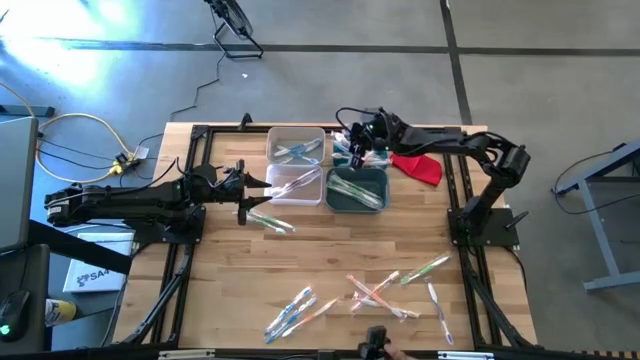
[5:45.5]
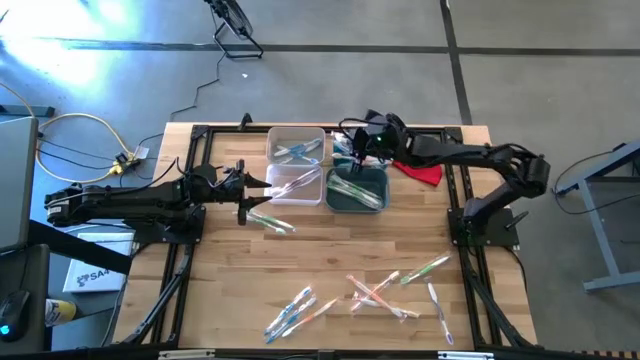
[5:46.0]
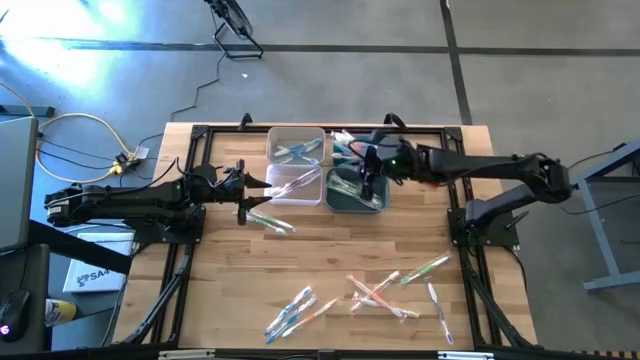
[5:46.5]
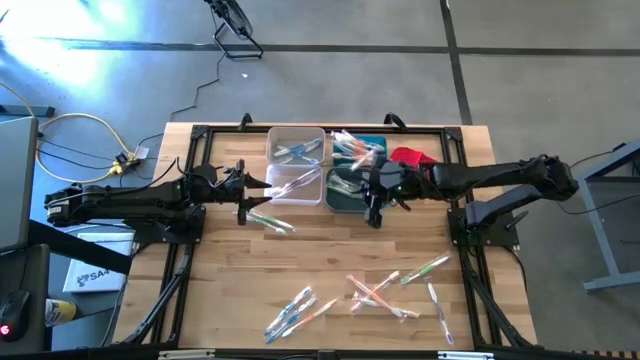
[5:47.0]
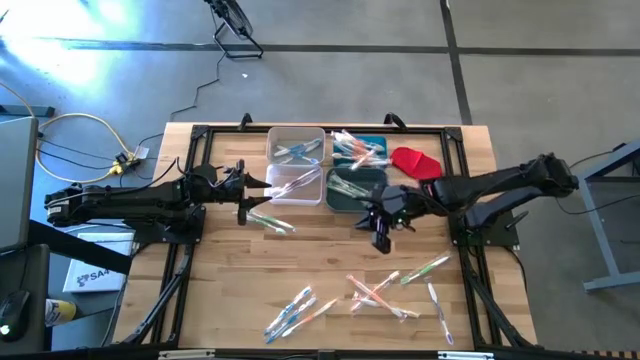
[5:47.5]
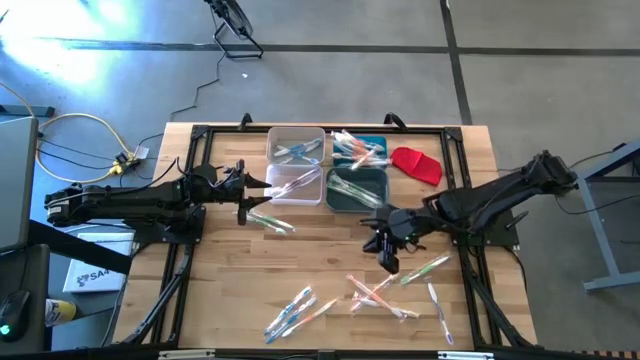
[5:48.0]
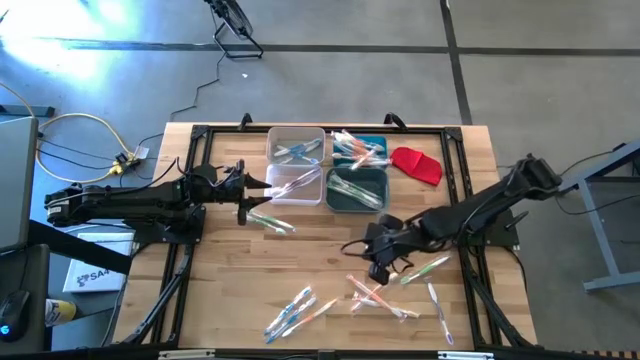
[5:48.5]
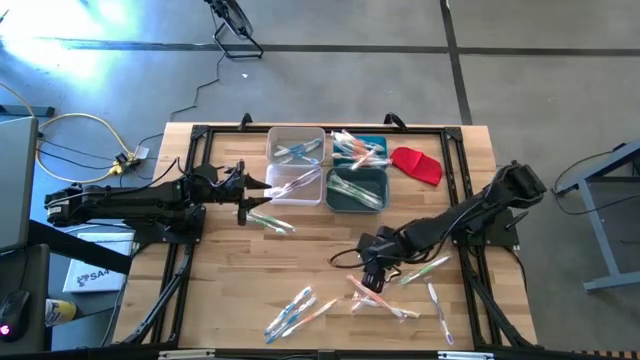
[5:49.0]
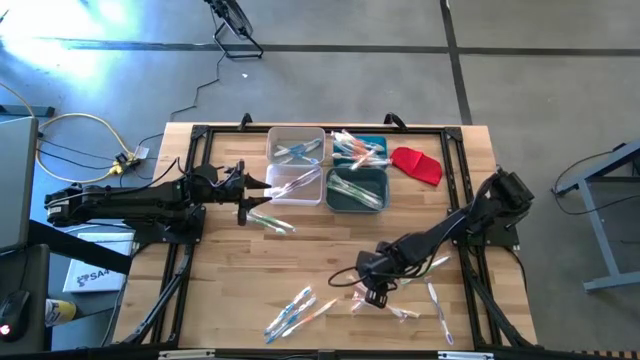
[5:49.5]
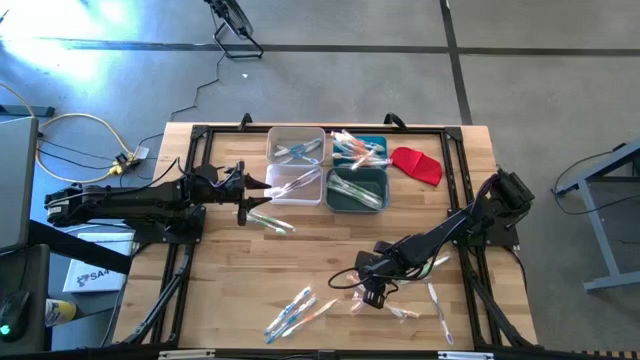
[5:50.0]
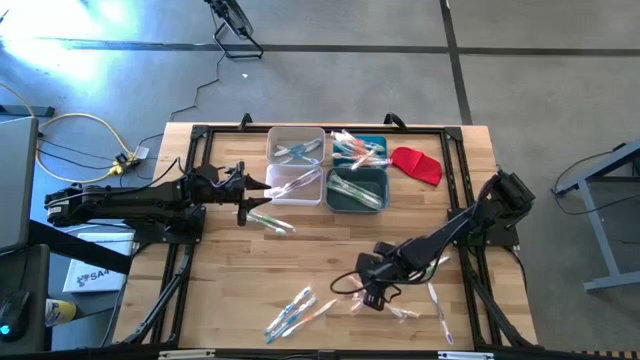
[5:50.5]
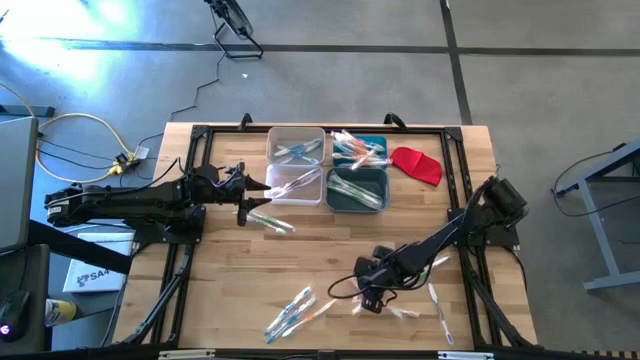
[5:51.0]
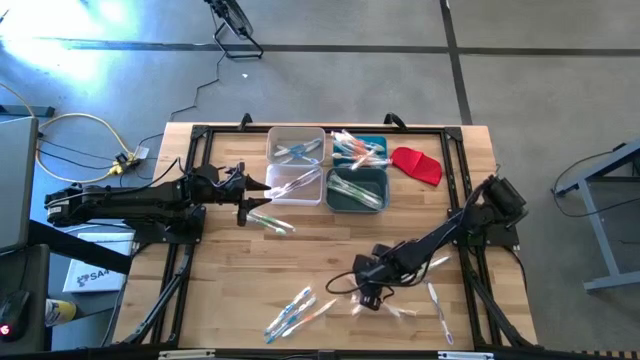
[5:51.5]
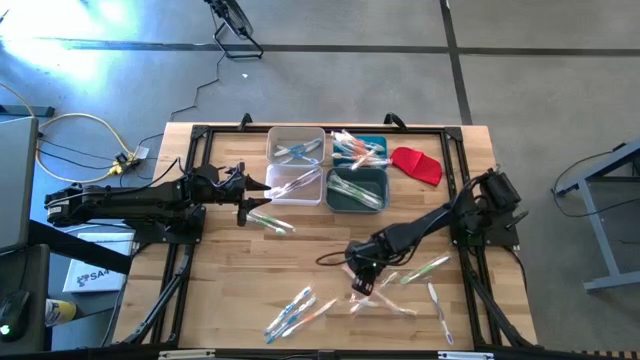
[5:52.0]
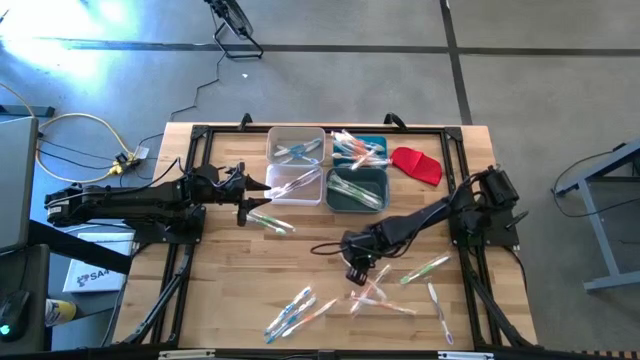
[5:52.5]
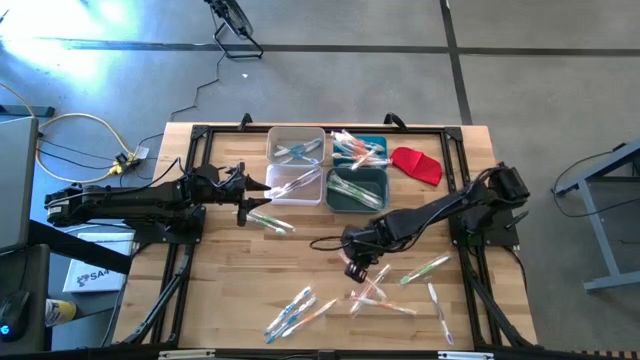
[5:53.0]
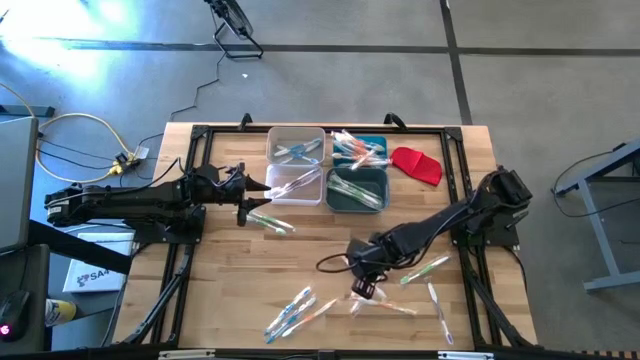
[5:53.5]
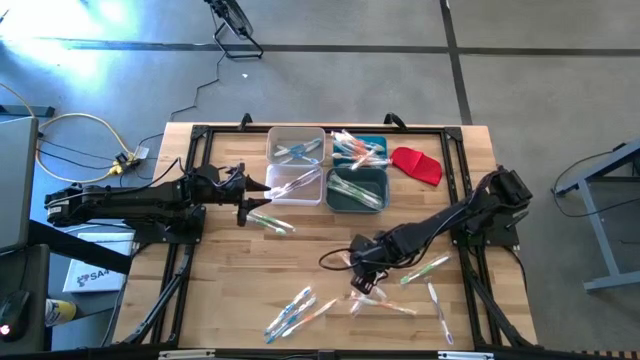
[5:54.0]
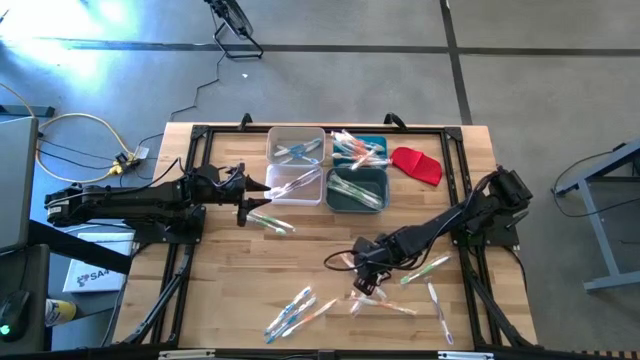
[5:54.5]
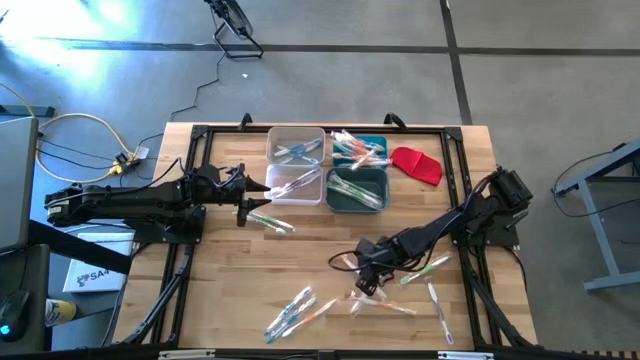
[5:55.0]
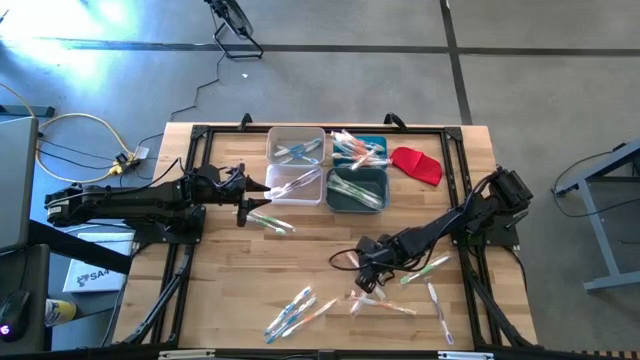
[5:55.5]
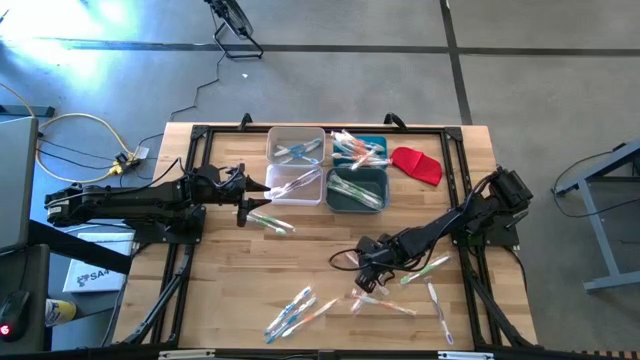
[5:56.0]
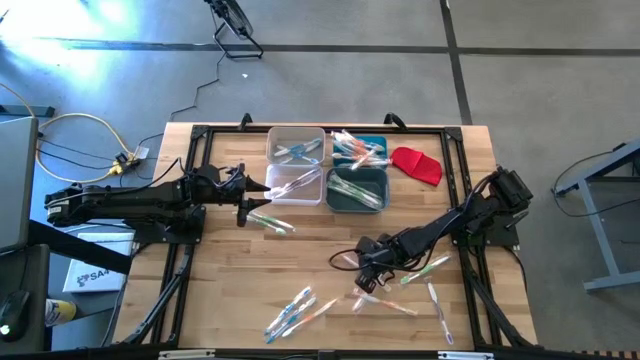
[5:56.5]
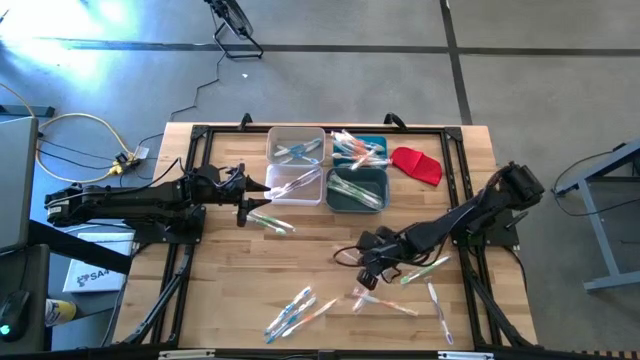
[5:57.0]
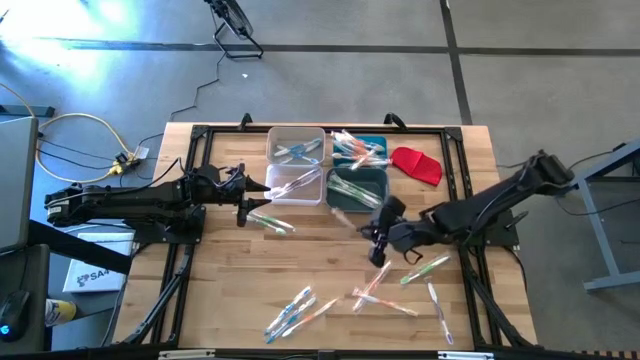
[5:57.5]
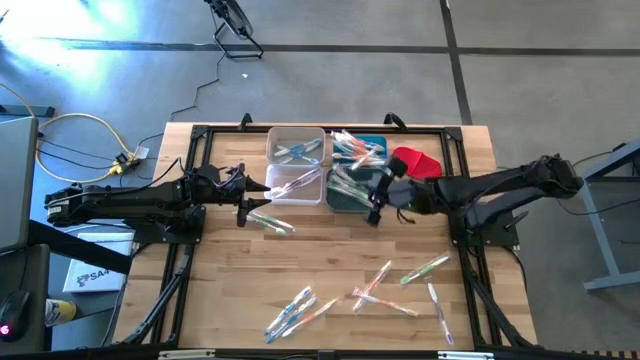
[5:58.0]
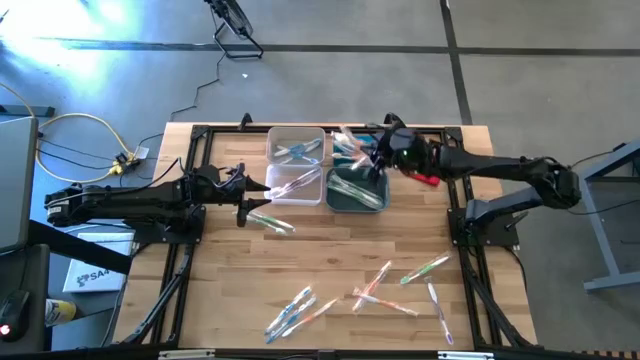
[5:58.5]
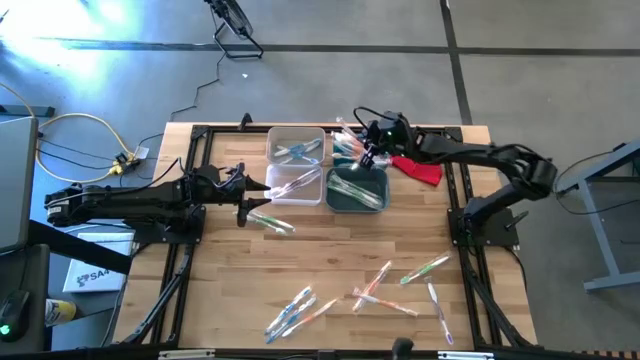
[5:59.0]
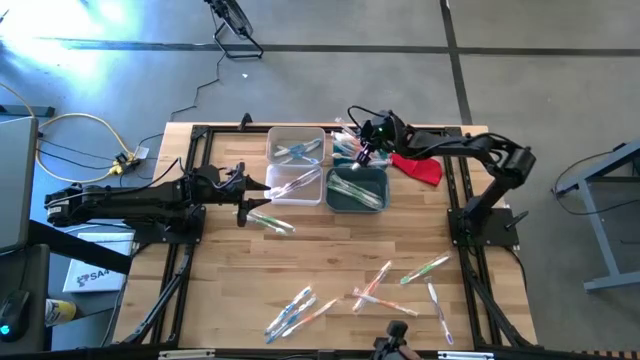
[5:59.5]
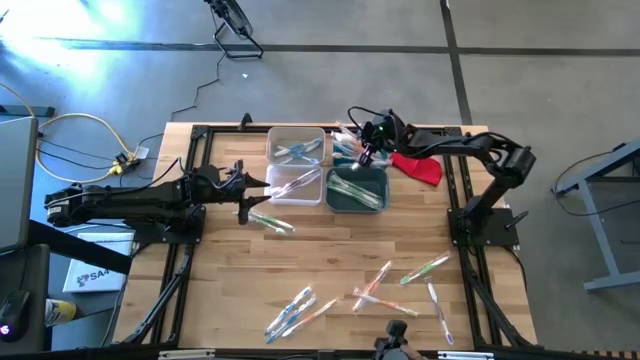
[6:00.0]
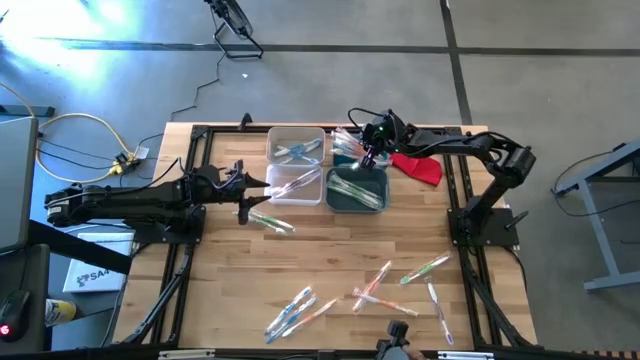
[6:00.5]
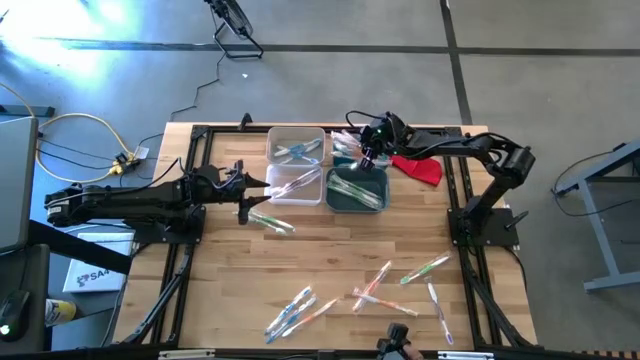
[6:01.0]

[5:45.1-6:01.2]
Task: Pick & Place Toothbrushes
Put the orange toothbrush into the blue bin

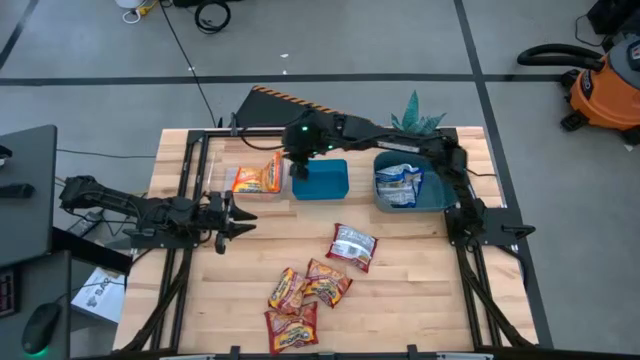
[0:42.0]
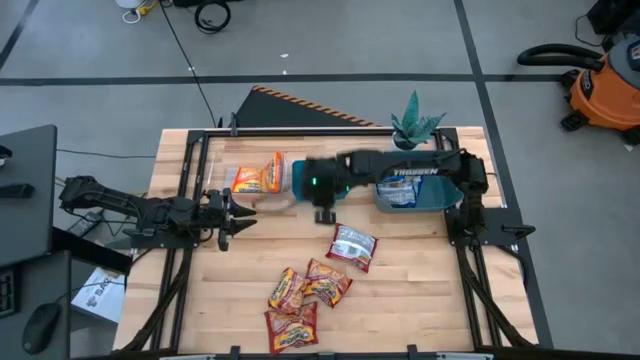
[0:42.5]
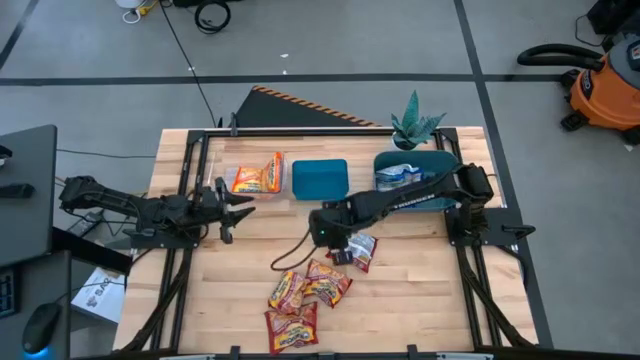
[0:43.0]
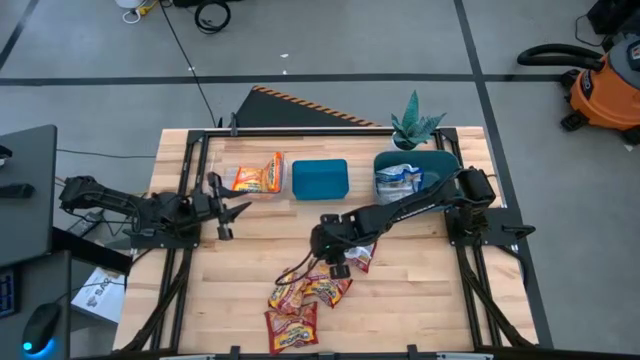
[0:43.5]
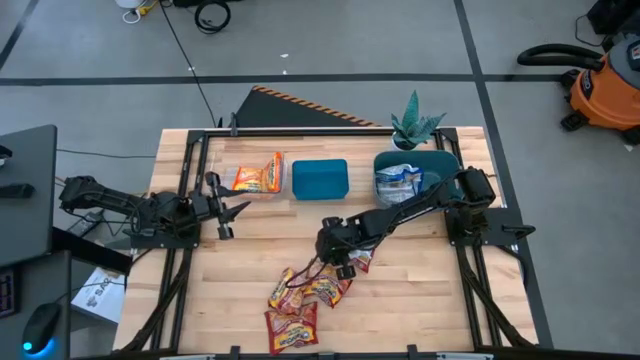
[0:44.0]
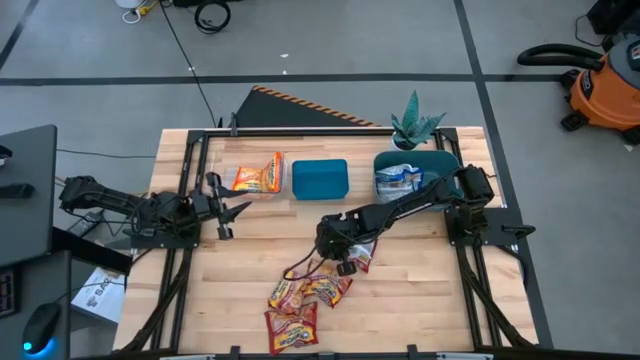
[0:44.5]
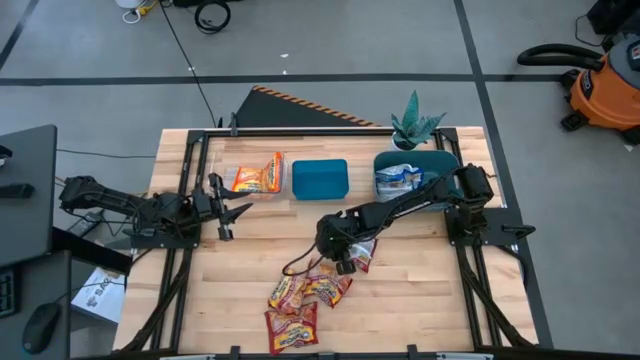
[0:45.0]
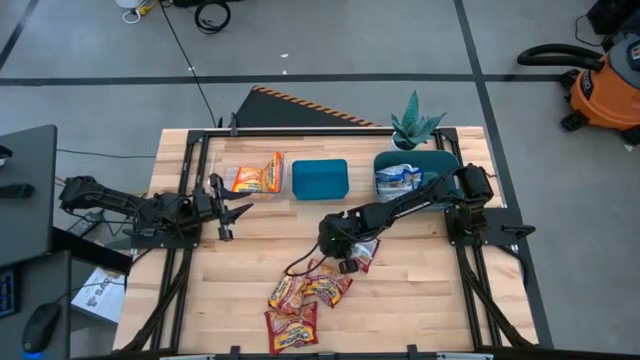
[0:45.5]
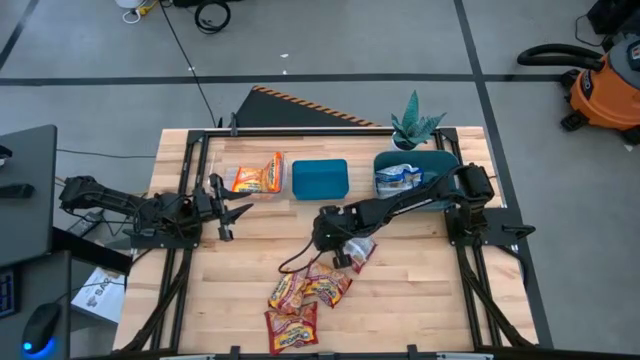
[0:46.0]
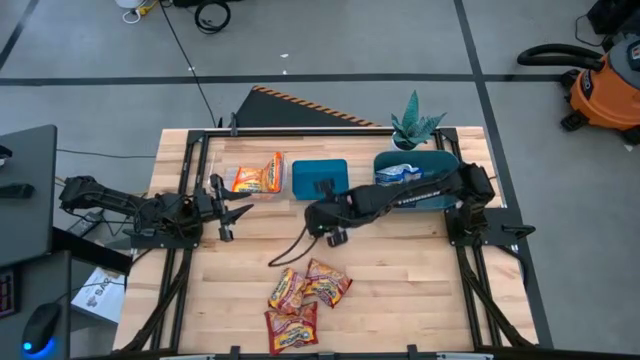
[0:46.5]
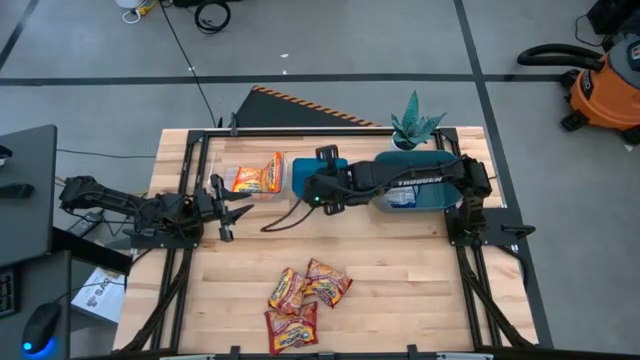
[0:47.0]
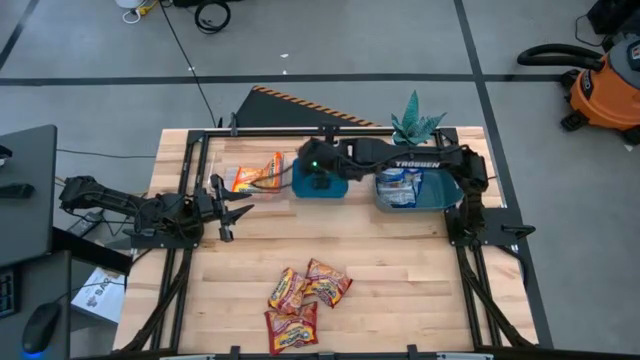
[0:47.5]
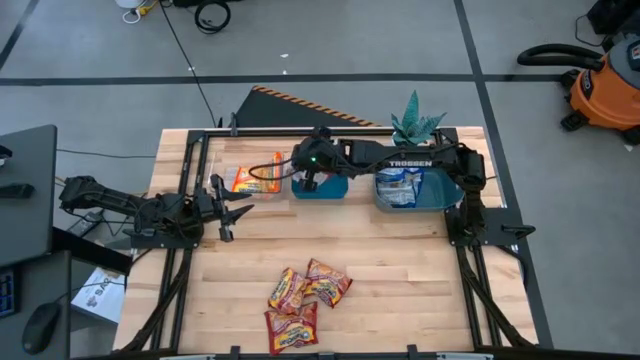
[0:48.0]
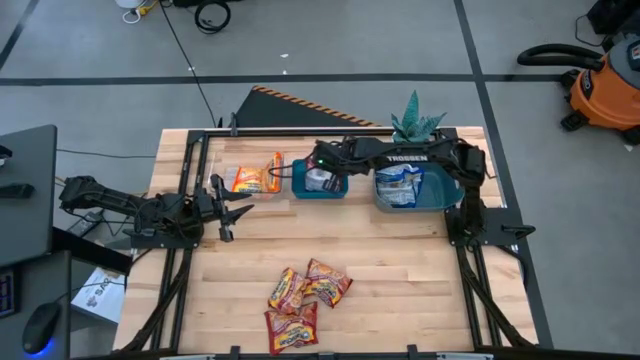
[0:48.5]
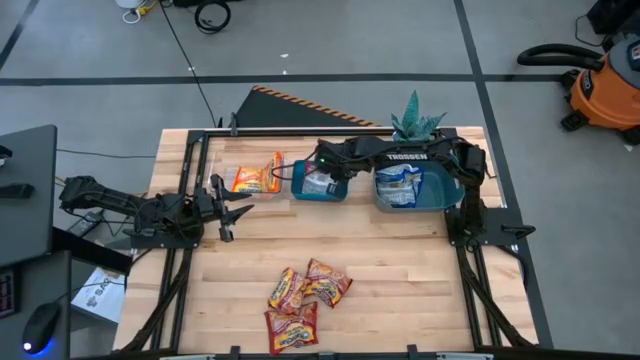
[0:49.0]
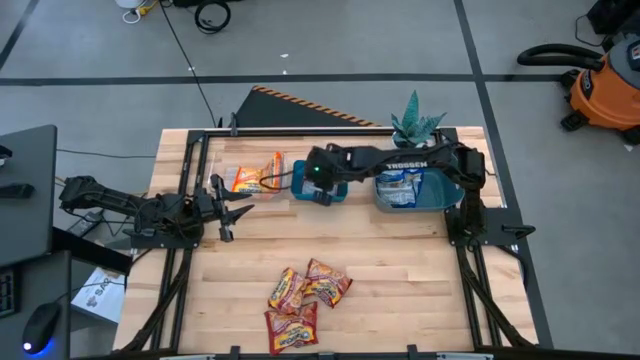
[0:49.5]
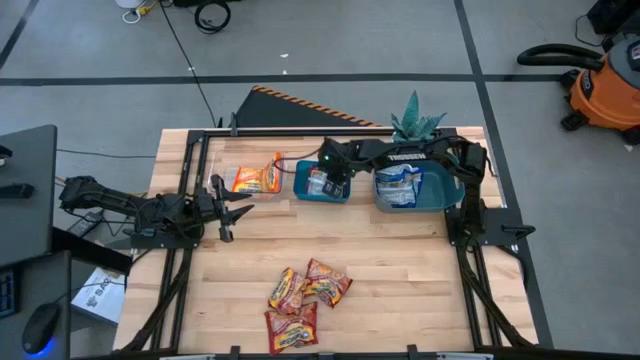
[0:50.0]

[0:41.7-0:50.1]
Task: Sort Maruchan noodles
Put the red noodle pack into the blue bin
